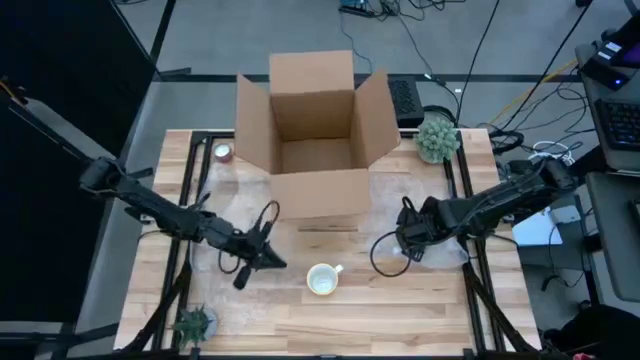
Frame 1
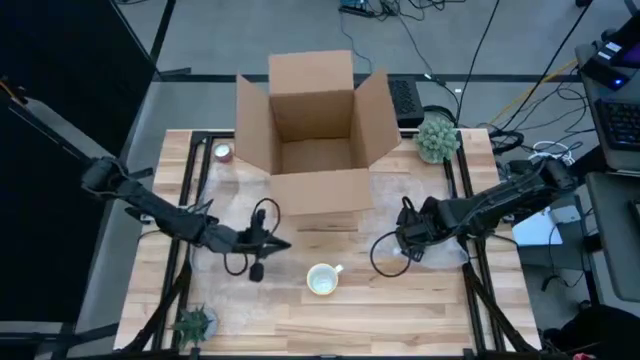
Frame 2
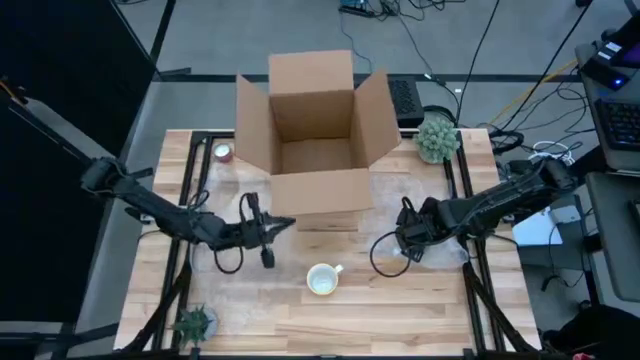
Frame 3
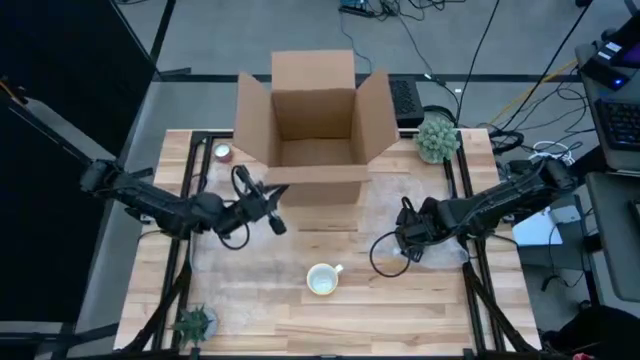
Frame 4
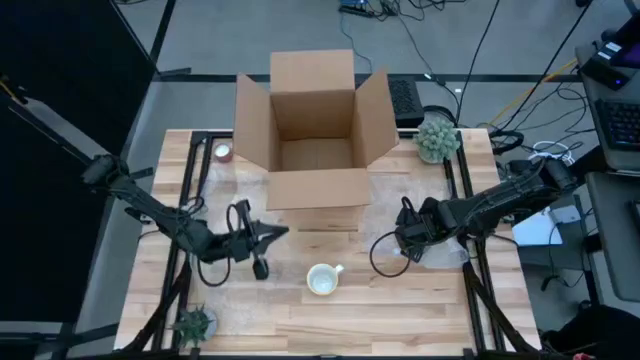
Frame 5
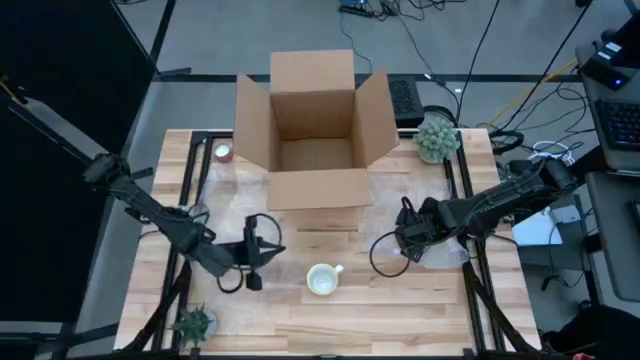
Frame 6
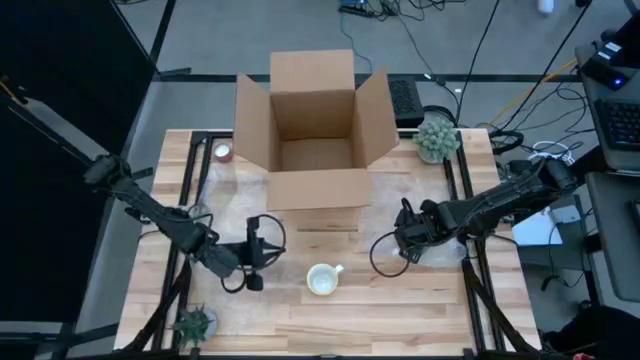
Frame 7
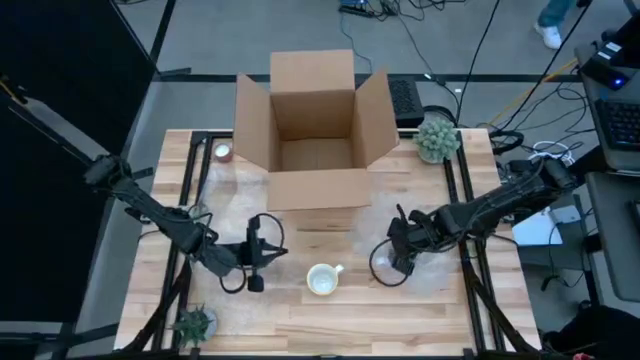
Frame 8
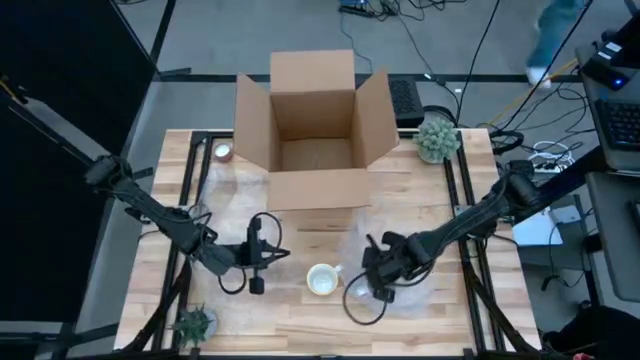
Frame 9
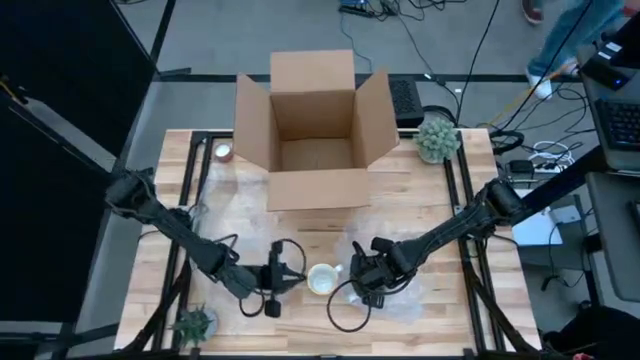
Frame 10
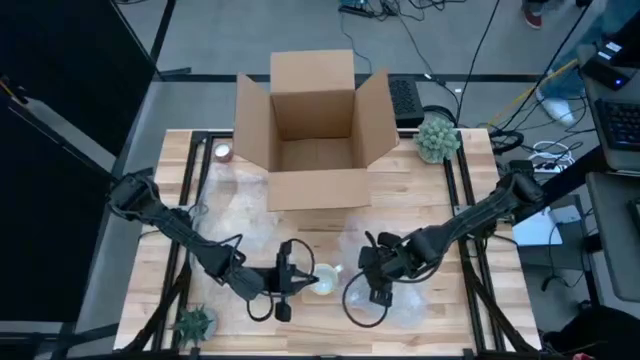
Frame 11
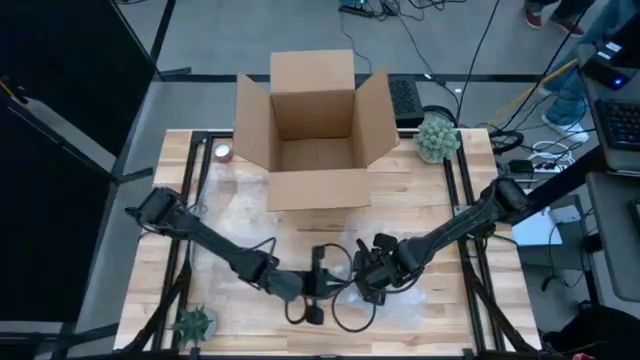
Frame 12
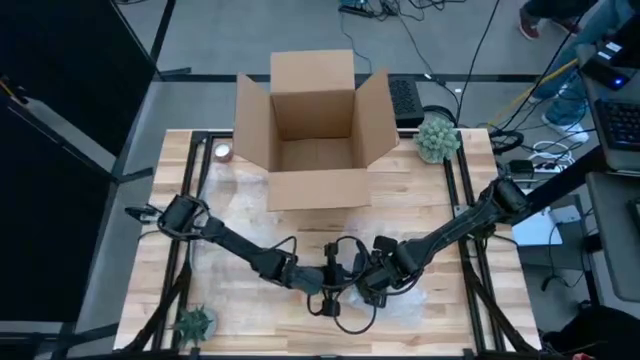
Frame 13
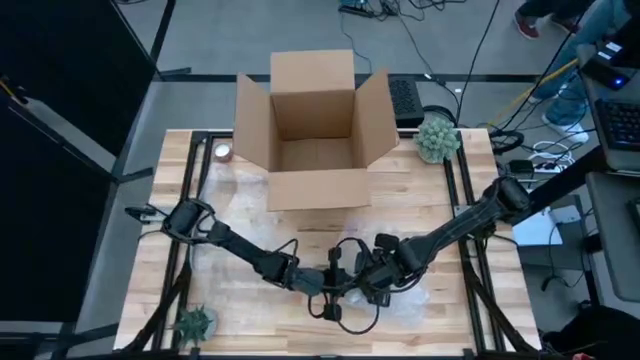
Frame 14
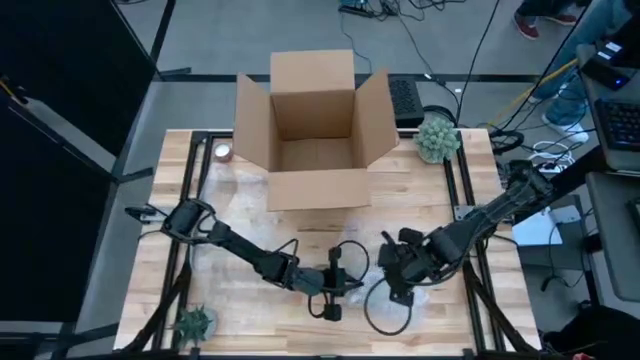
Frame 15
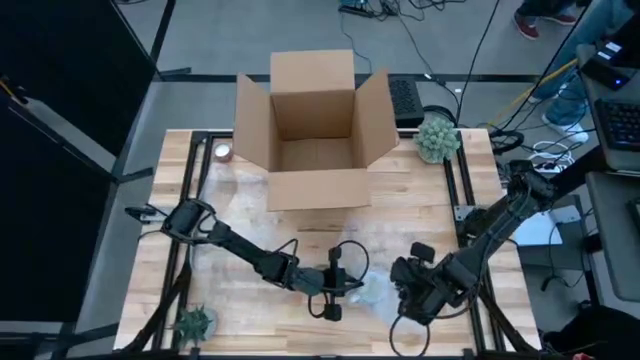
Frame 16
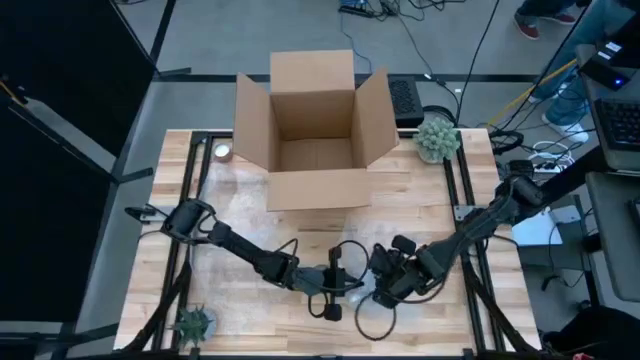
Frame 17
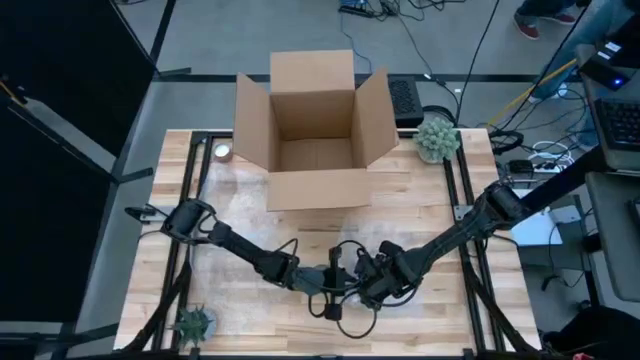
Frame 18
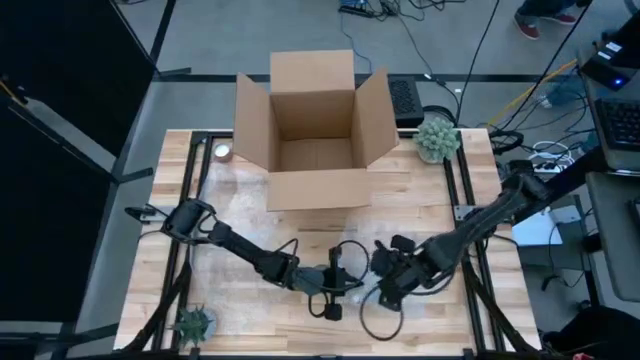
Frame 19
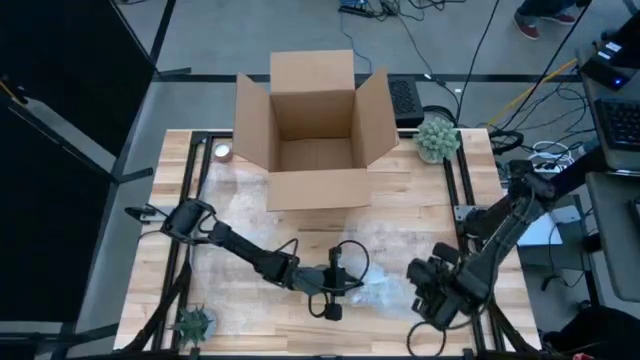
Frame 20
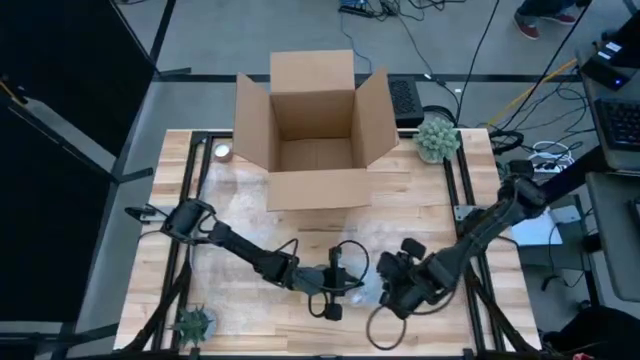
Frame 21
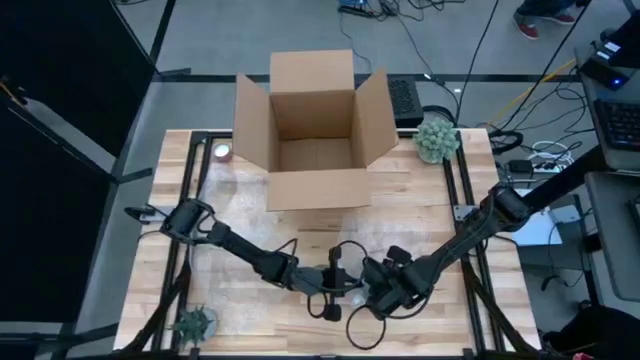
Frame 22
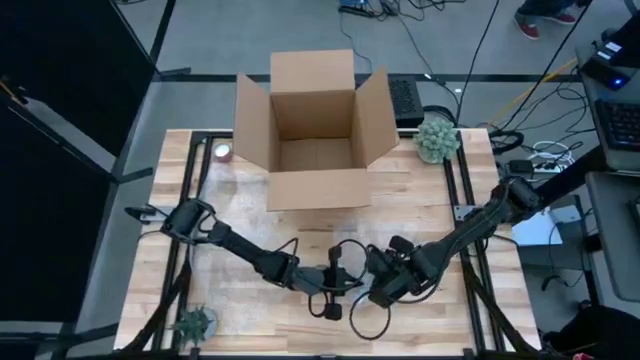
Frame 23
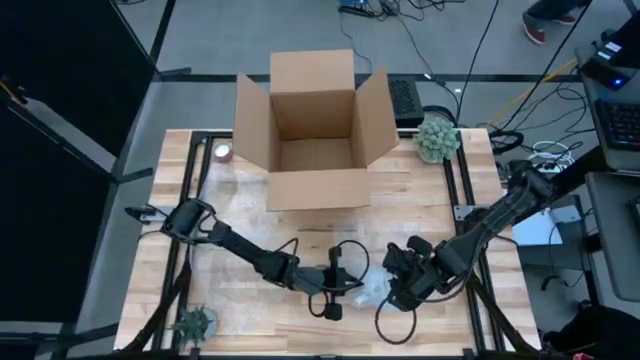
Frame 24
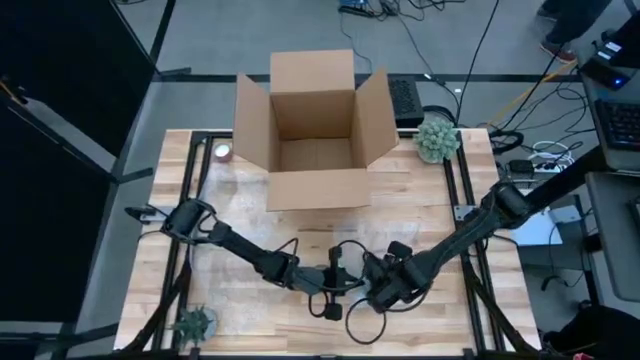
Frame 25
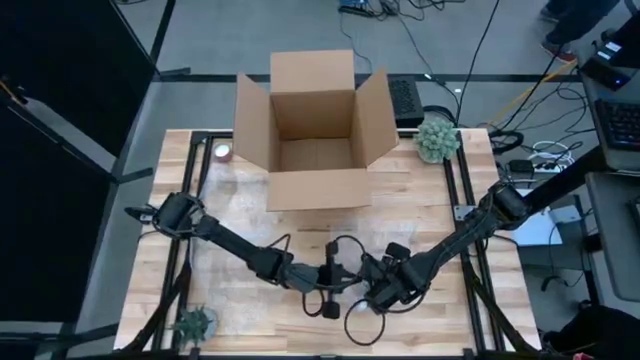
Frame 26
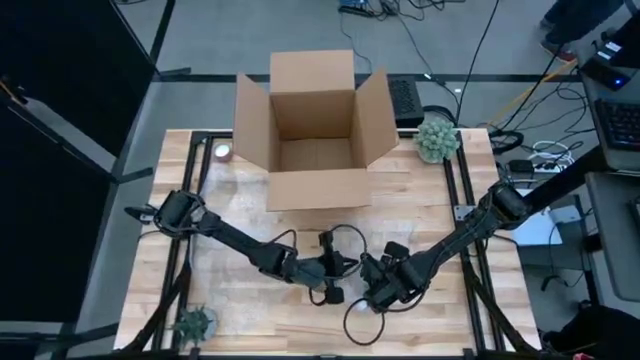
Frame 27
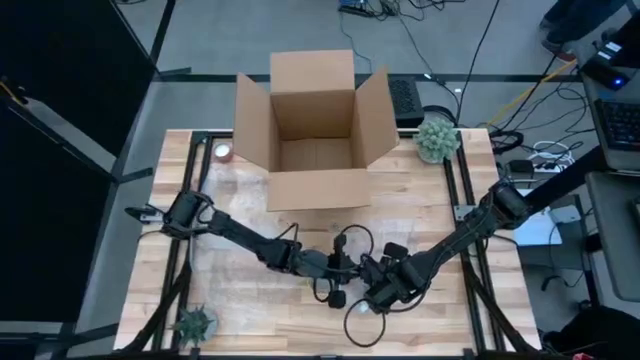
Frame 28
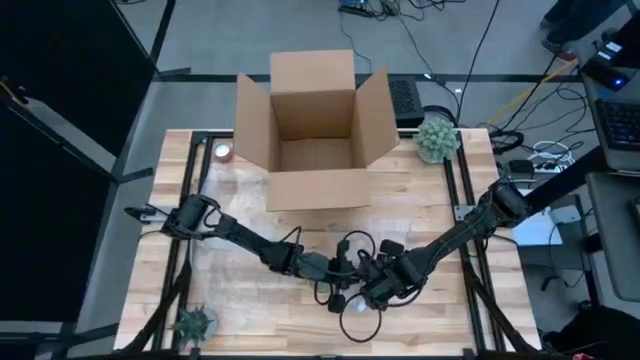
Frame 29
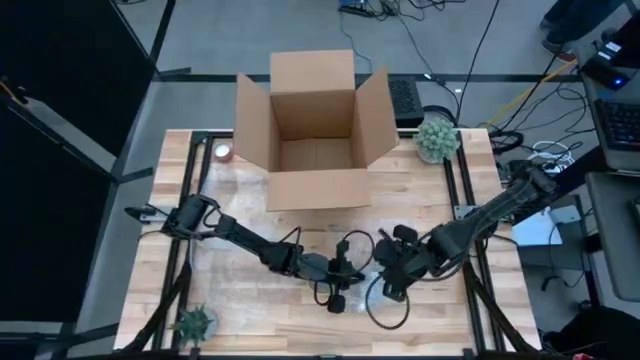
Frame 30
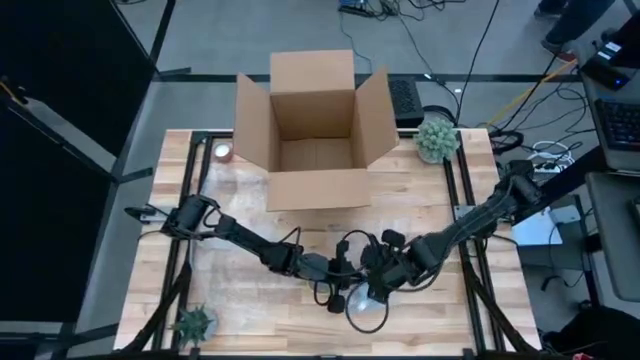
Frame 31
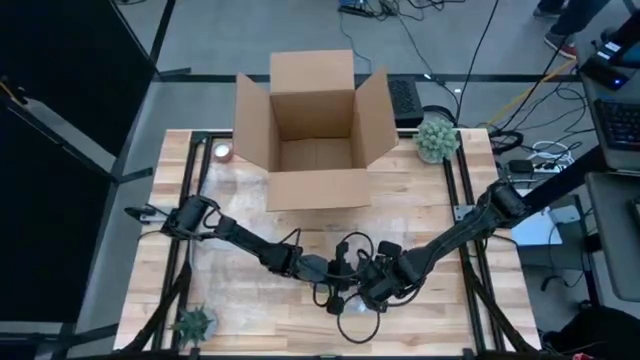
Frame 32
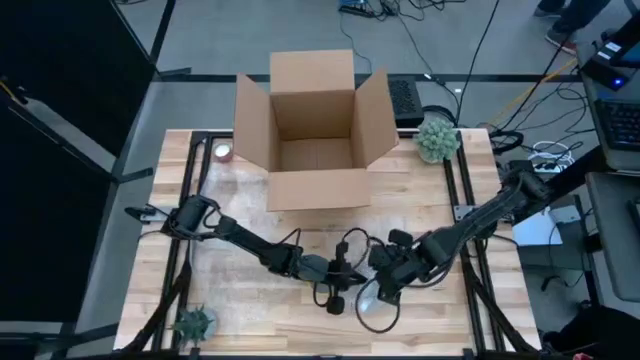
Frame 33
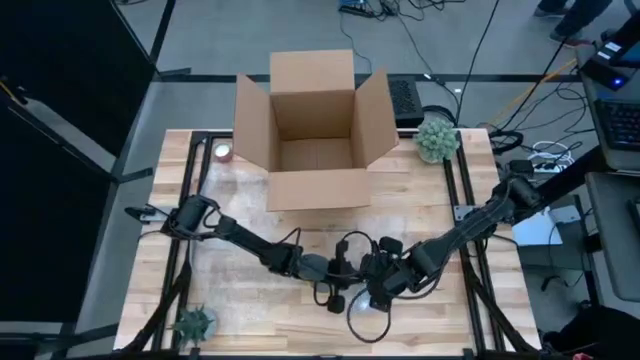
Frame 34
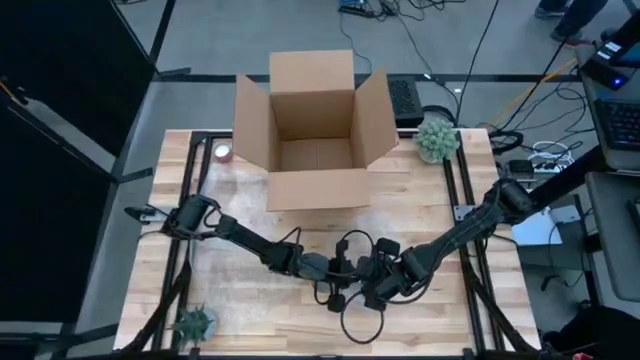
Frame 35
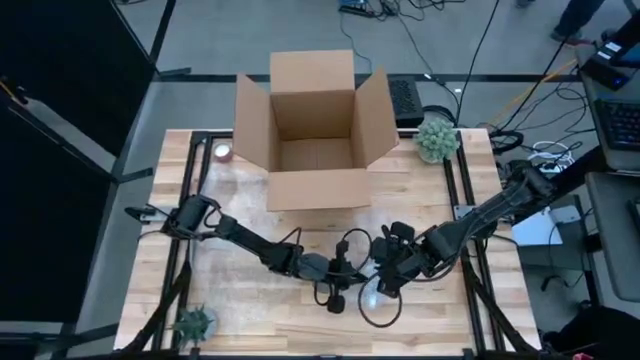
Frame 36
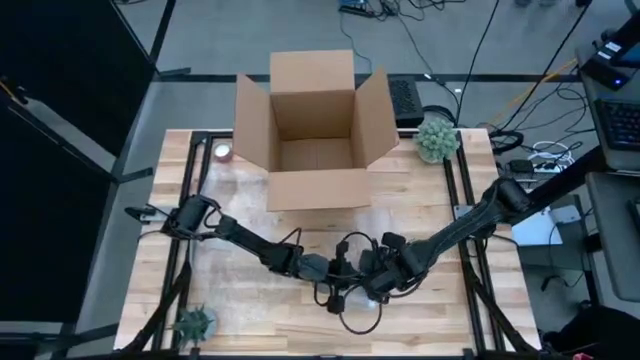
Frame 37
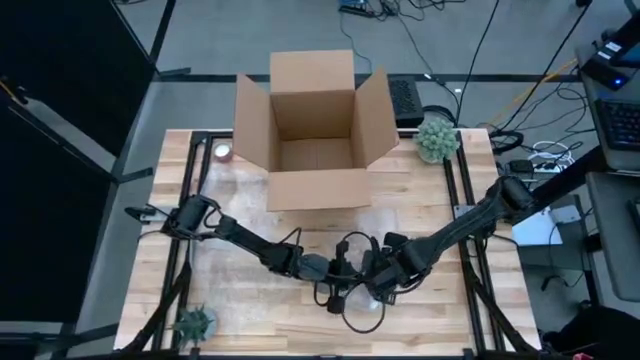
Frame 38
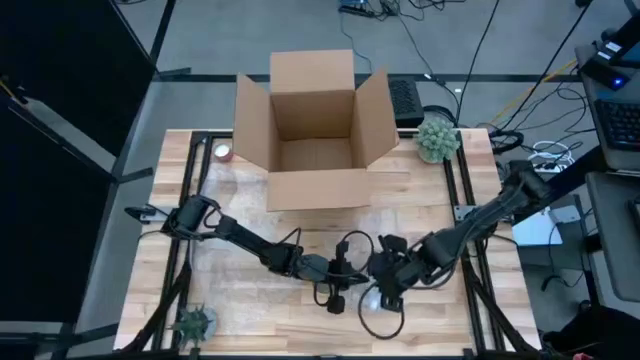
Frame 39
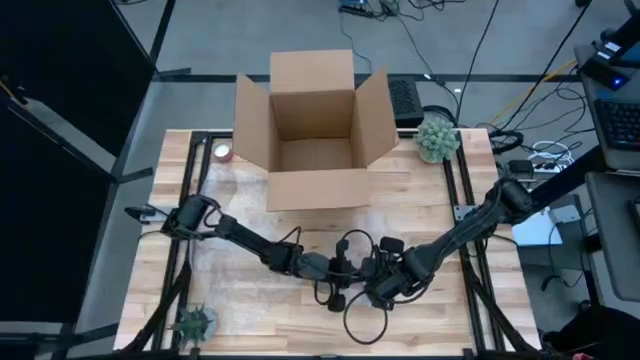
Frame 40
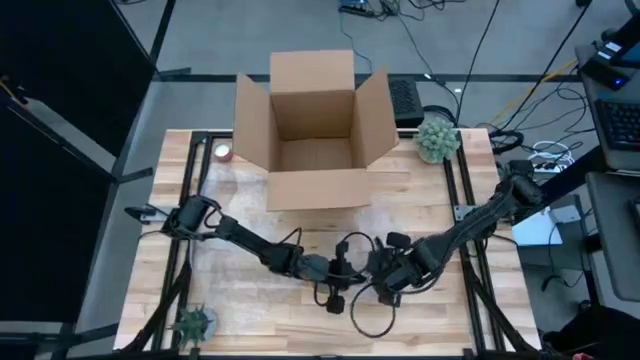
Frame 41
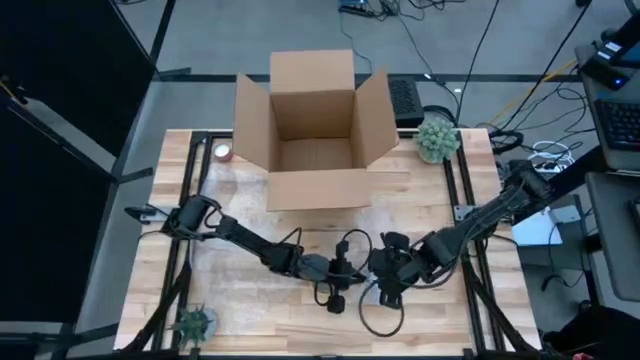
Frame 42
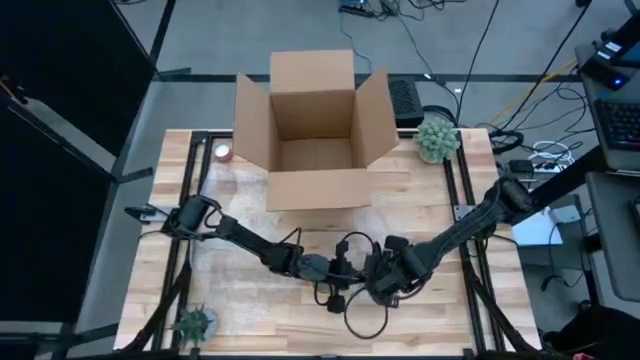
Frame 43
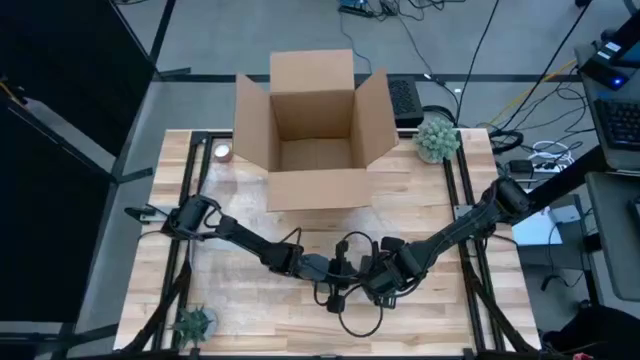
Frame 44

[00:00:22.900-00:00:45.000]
Task: wrap mug
Wrap the red mug with the bubble wrap
